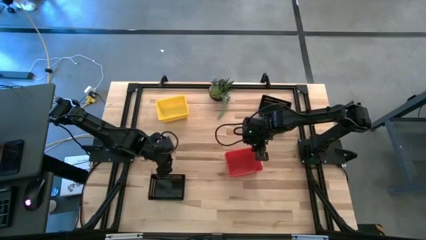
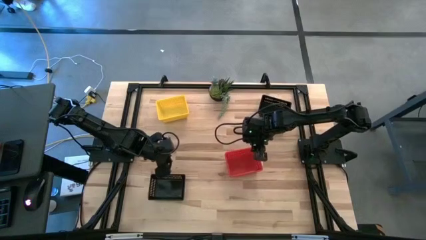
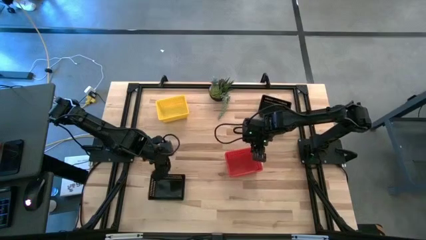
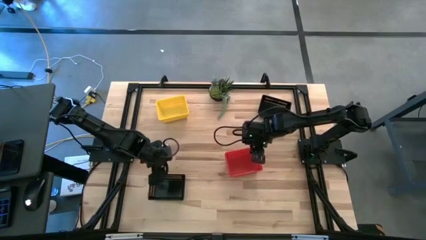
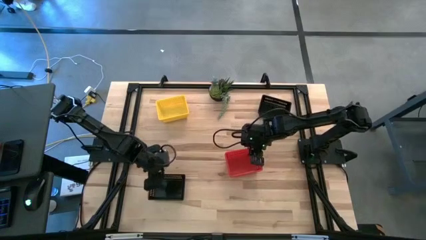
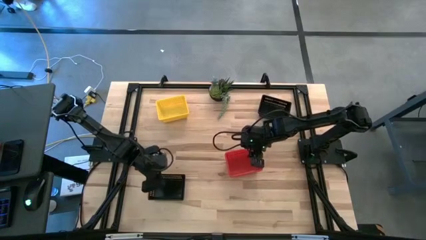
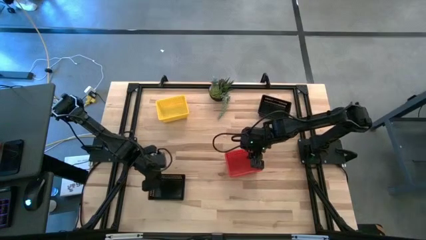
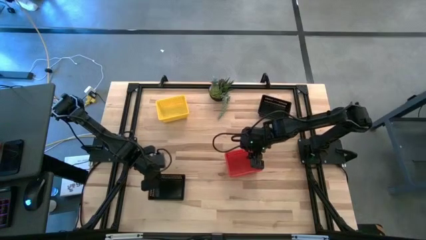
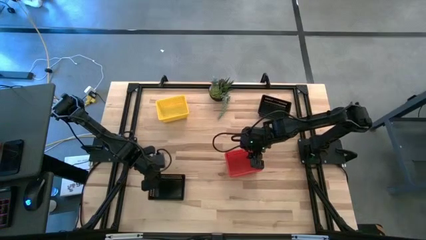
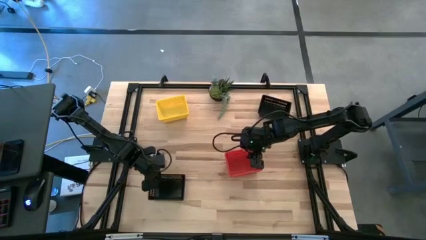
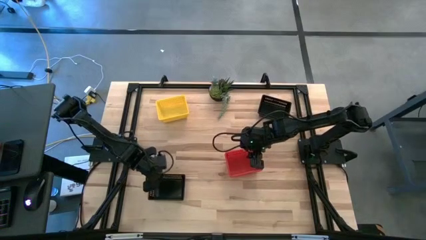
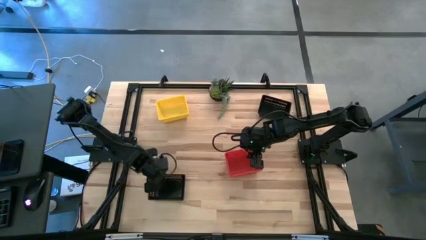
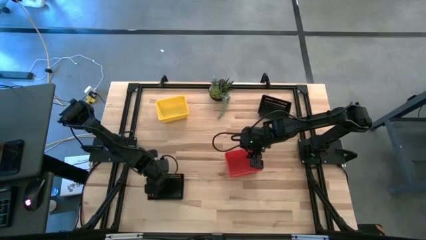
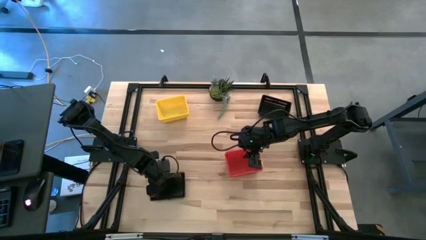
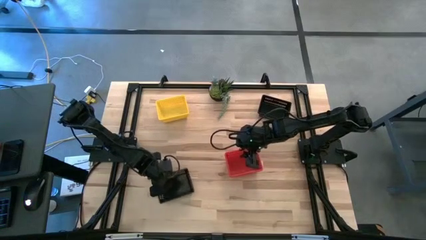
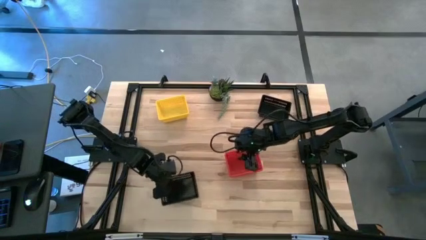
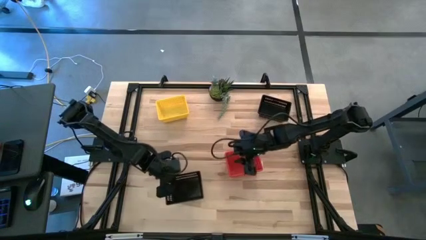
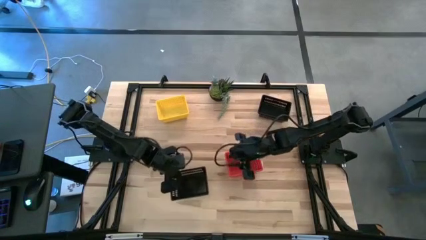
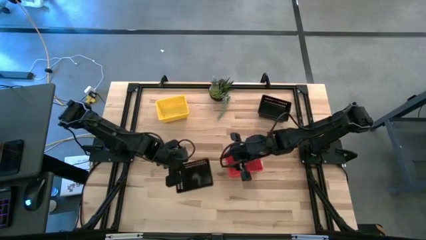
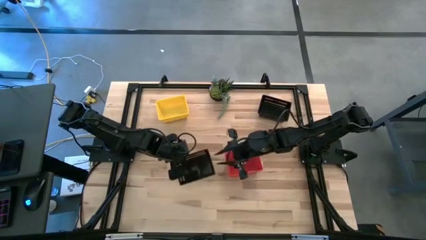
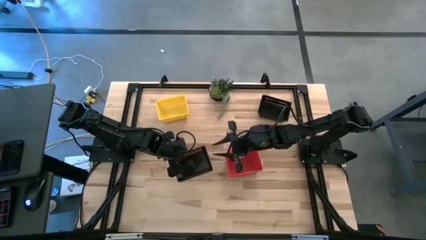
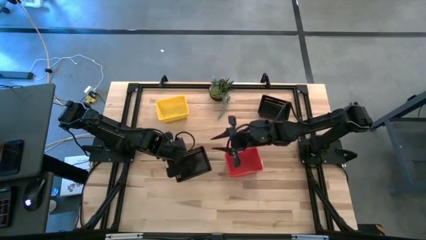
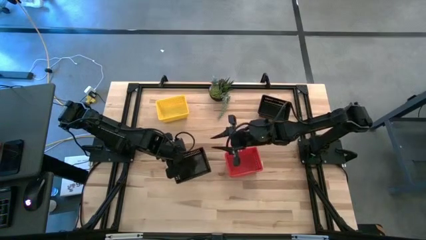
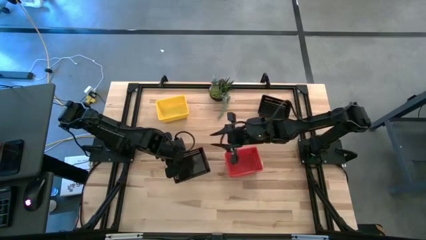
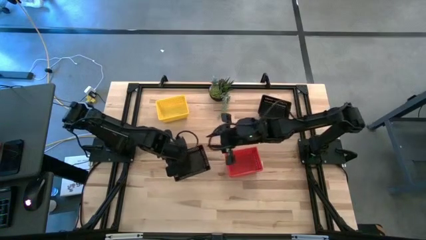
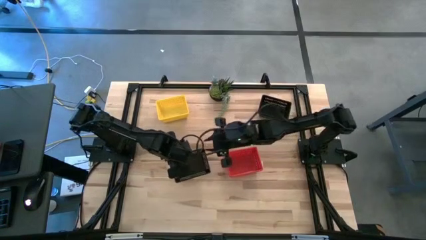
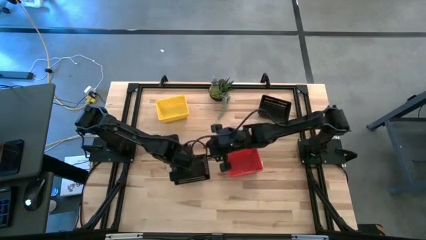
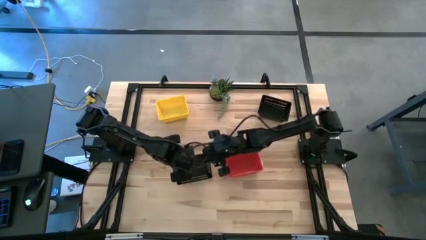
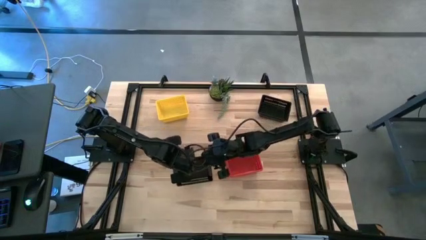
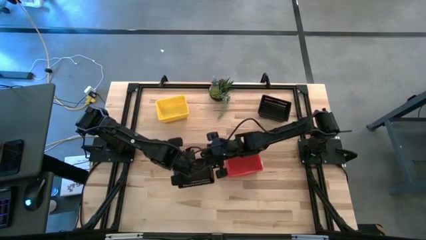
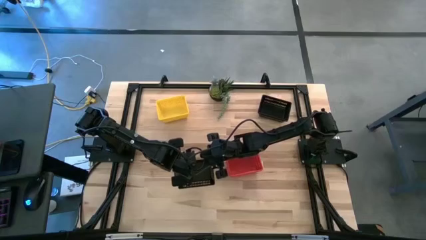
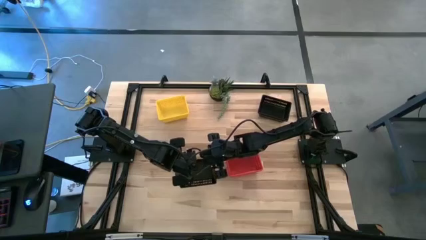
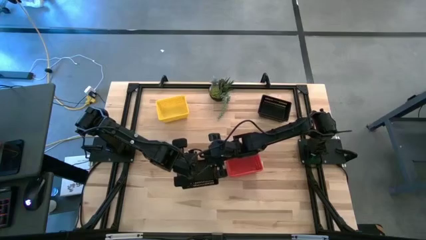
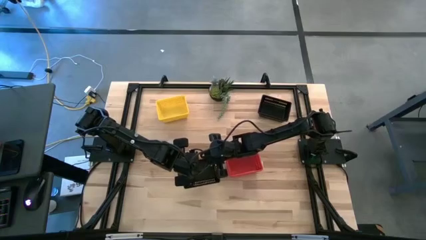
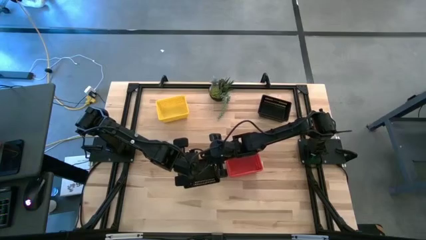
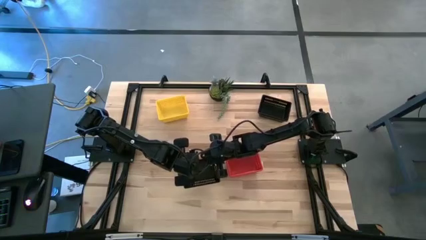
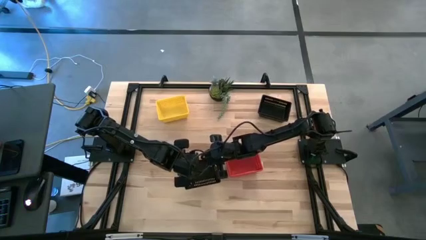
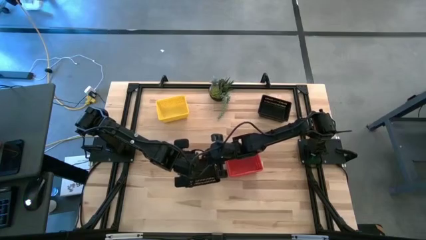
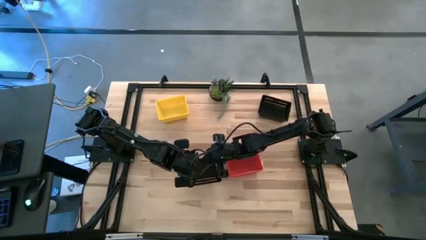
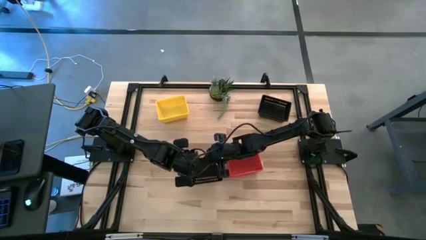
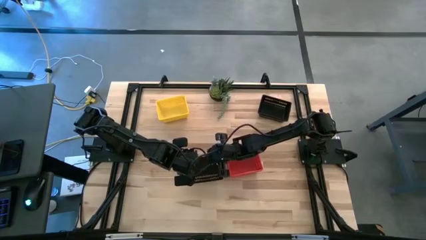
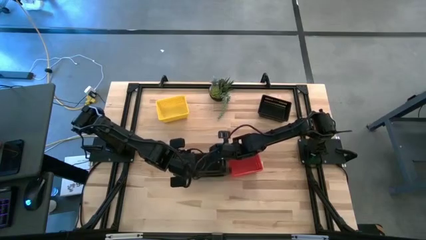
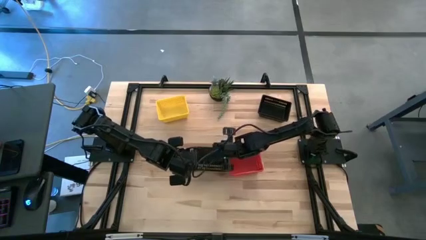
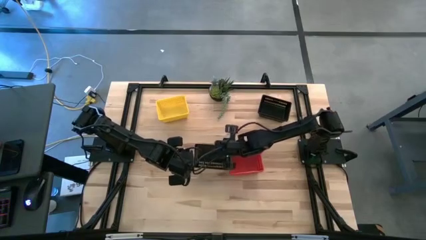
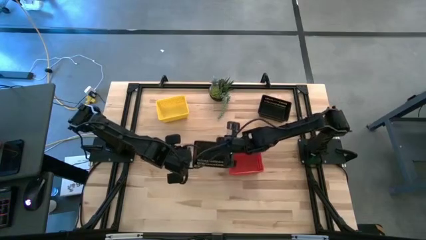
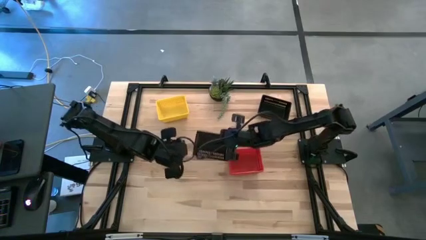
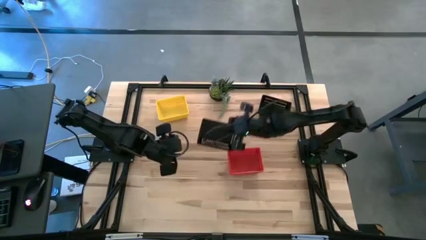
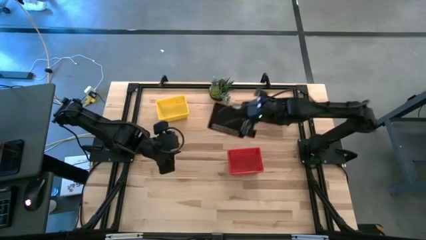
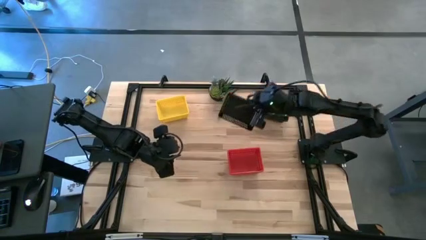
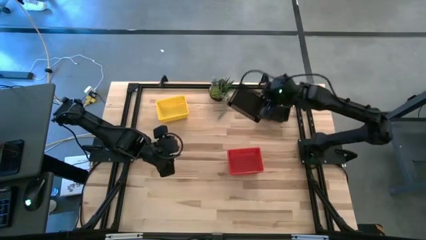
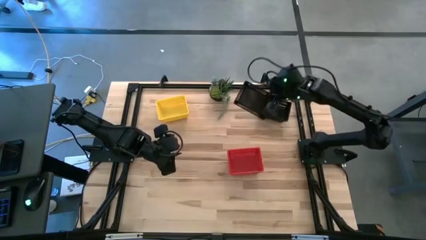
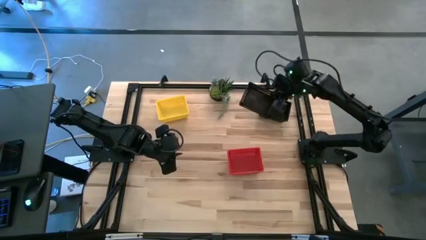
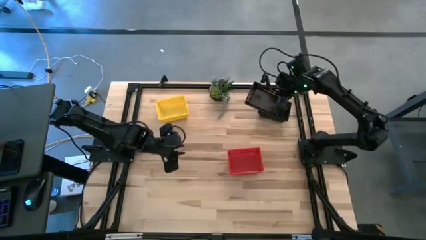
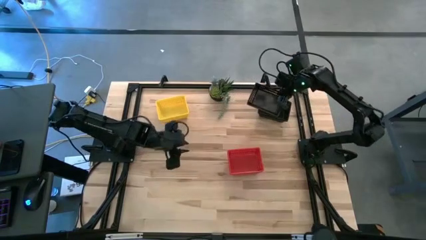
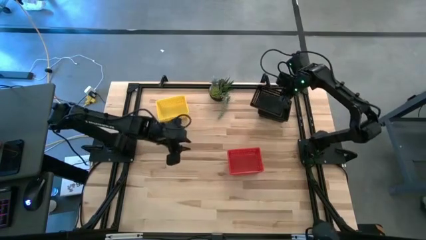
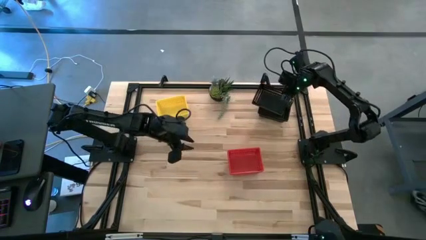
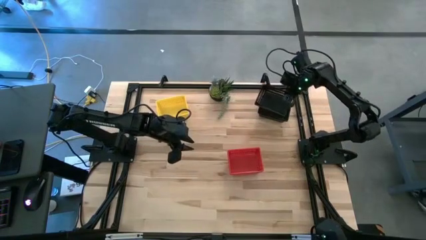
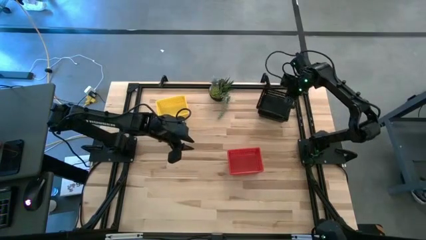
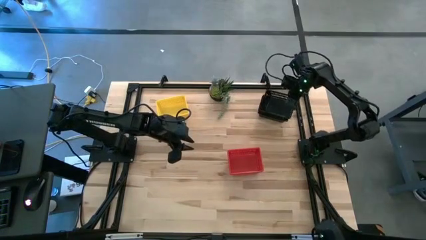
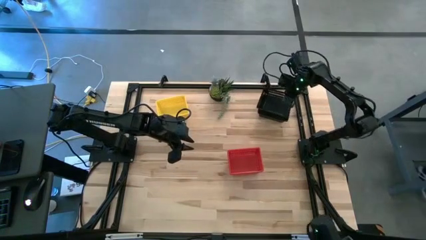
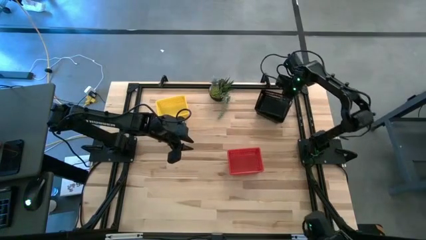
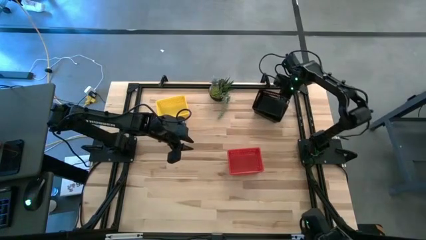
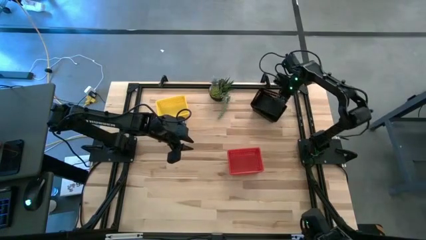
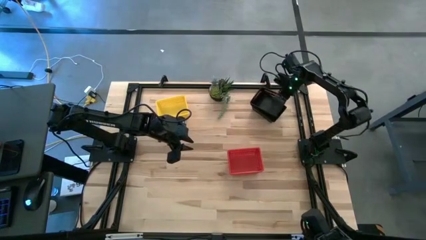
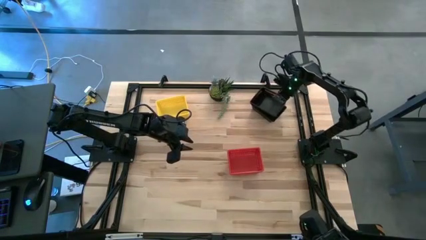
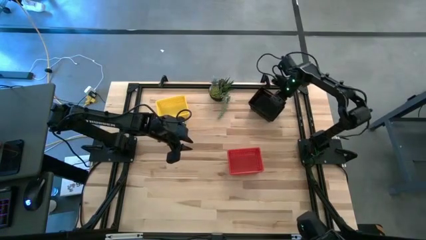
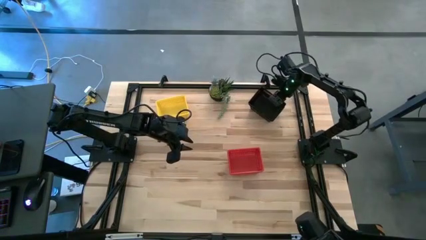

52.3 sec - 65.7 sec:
Stack the bottom black bin on top of the top black bin on the table

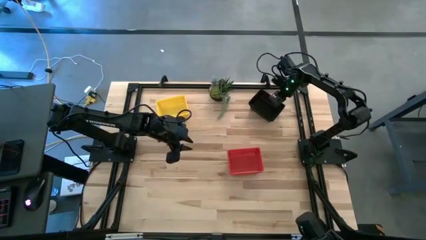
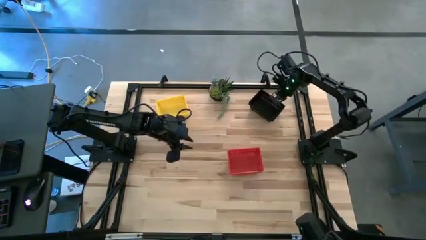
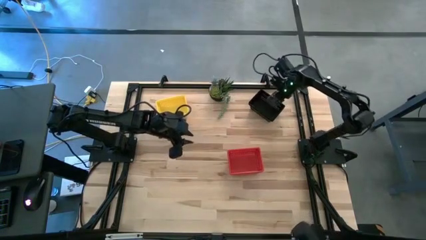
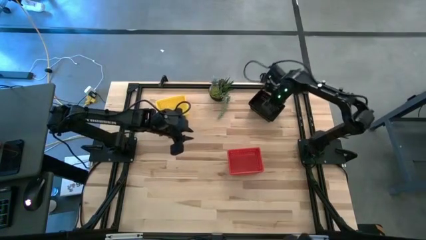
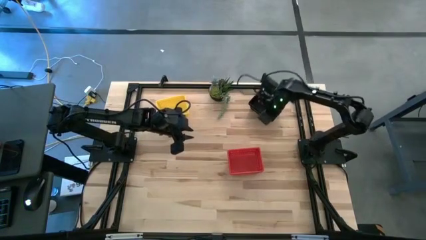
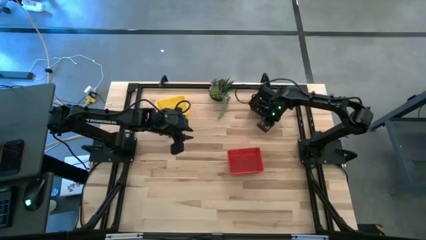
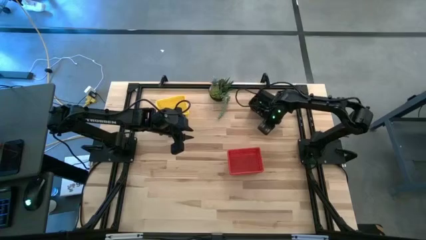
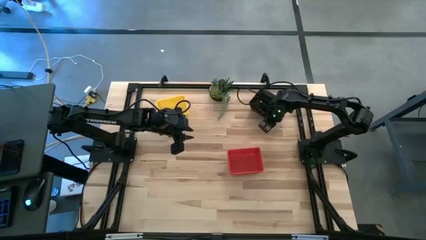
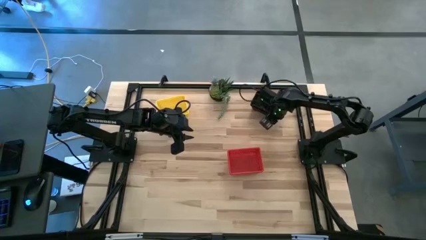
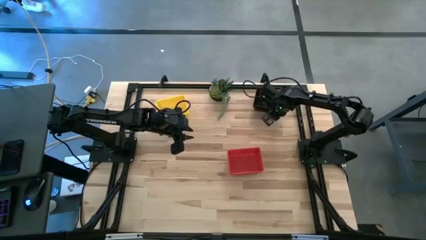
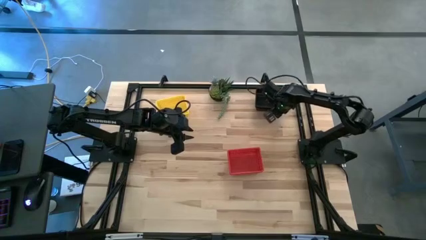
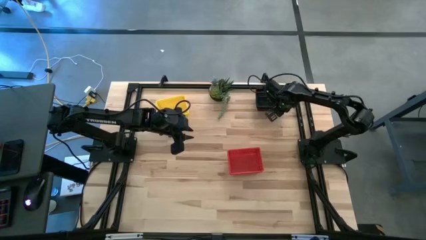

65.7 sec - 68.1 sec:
Adjust the stacked black bins on the table
